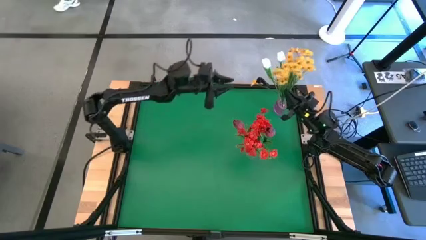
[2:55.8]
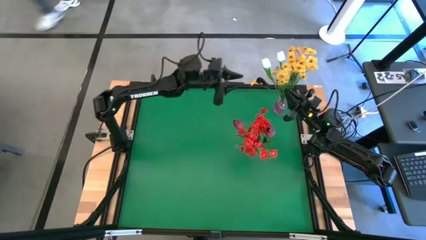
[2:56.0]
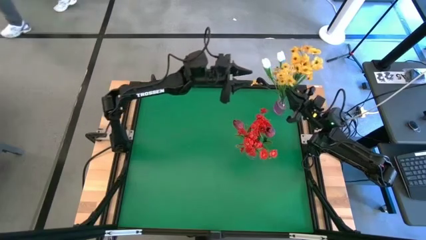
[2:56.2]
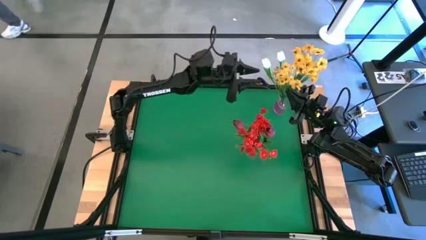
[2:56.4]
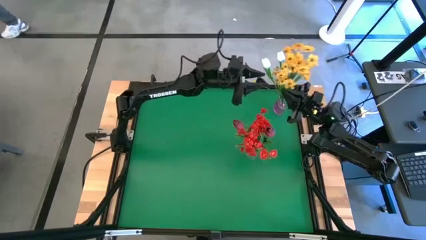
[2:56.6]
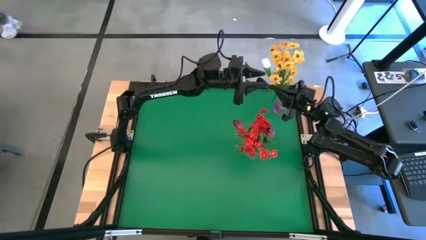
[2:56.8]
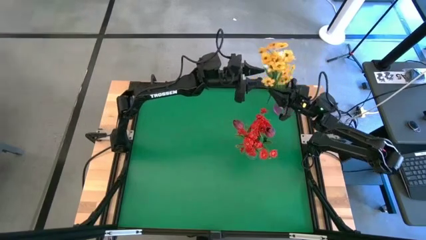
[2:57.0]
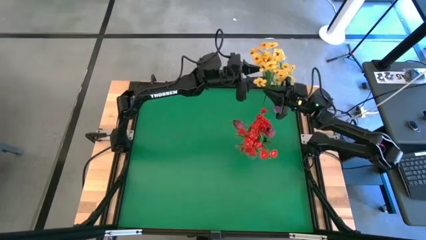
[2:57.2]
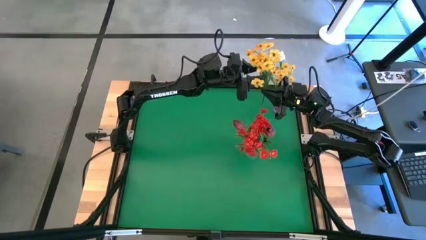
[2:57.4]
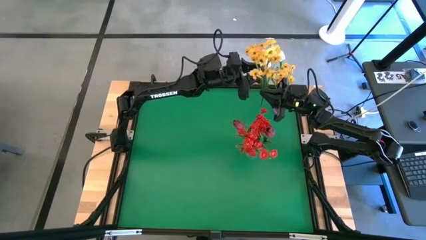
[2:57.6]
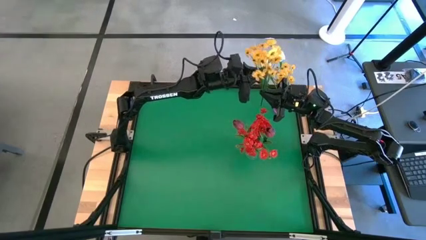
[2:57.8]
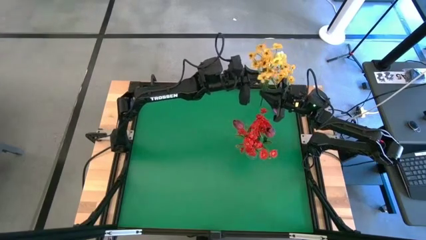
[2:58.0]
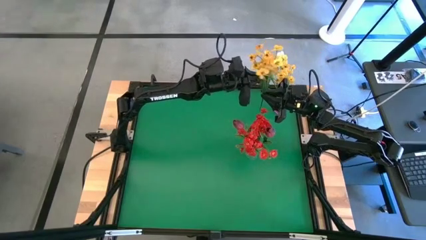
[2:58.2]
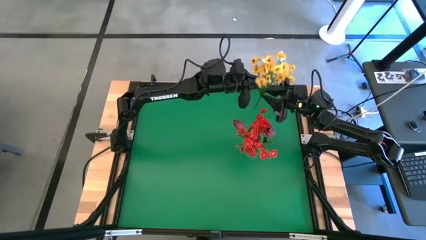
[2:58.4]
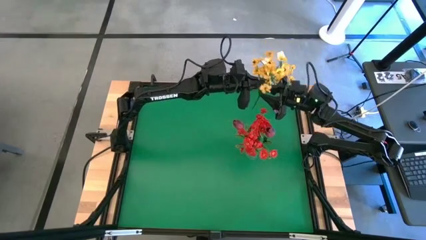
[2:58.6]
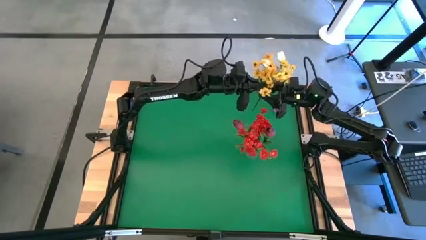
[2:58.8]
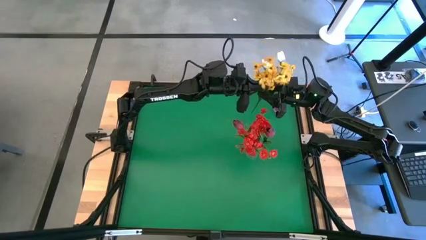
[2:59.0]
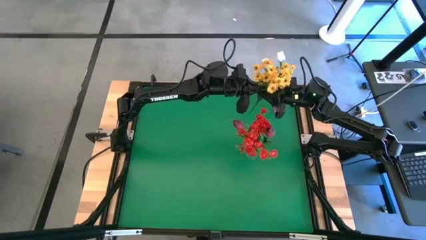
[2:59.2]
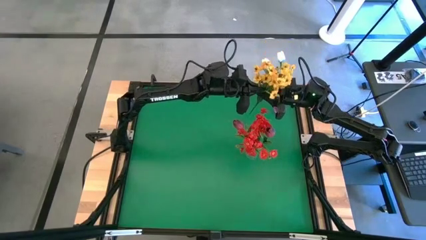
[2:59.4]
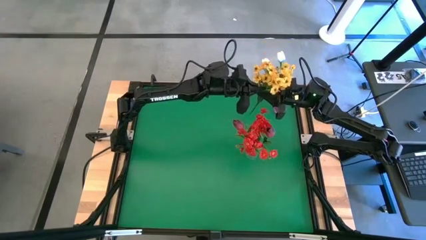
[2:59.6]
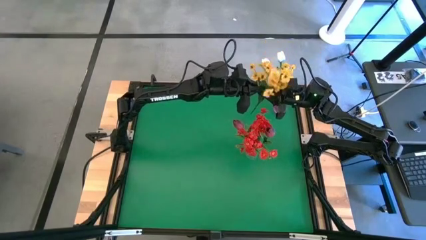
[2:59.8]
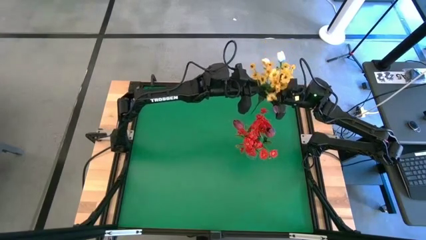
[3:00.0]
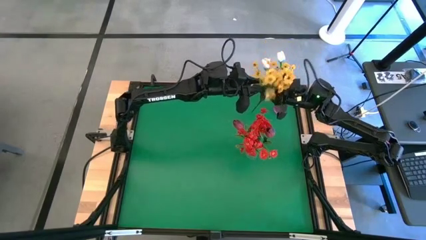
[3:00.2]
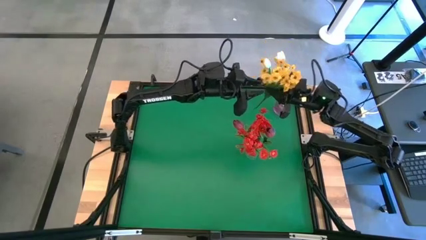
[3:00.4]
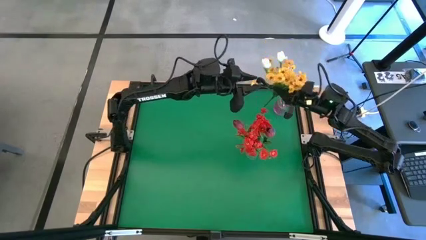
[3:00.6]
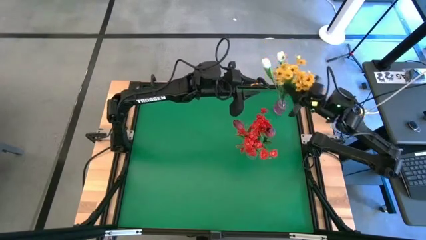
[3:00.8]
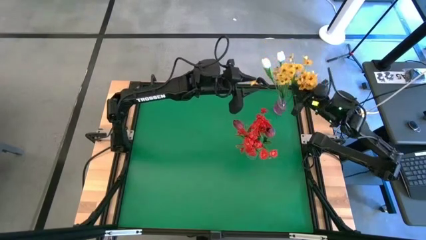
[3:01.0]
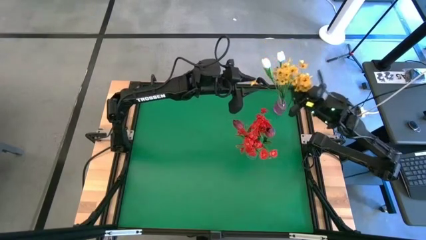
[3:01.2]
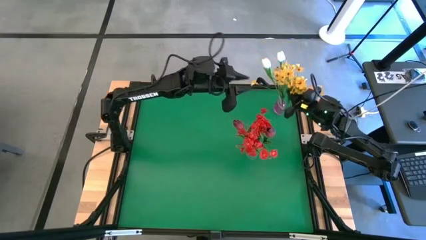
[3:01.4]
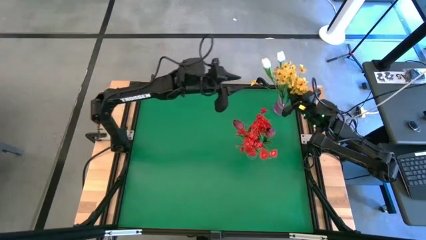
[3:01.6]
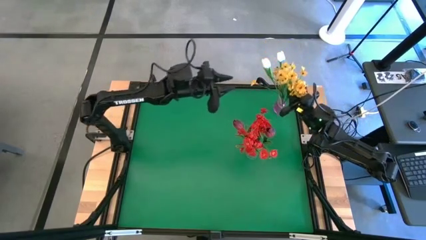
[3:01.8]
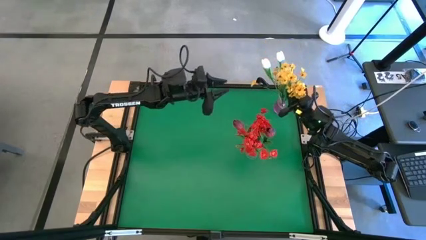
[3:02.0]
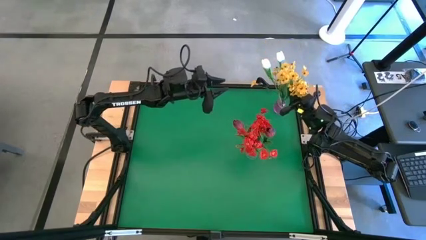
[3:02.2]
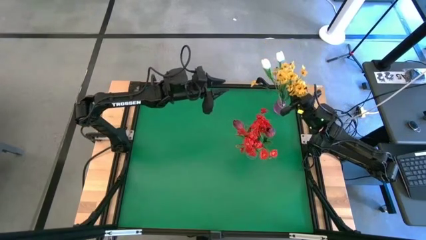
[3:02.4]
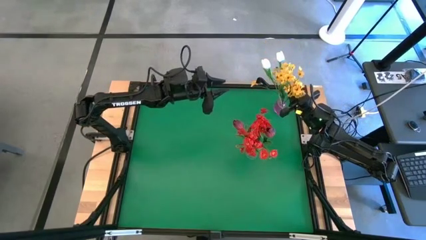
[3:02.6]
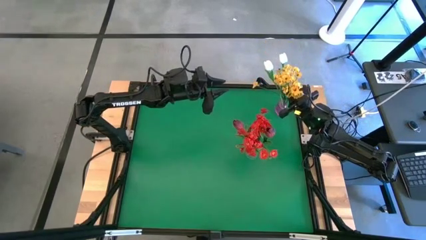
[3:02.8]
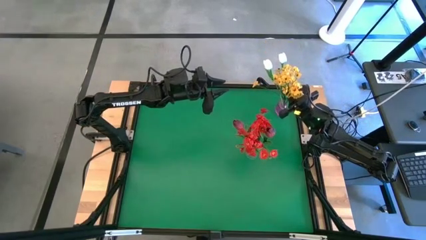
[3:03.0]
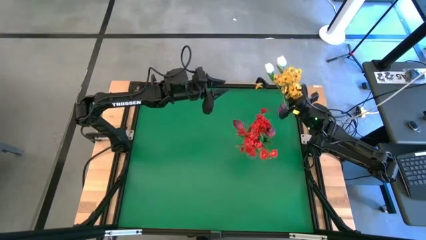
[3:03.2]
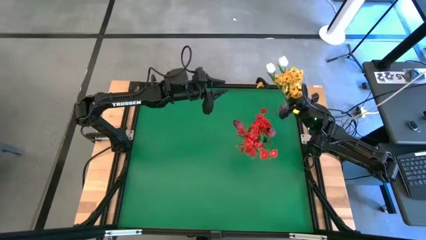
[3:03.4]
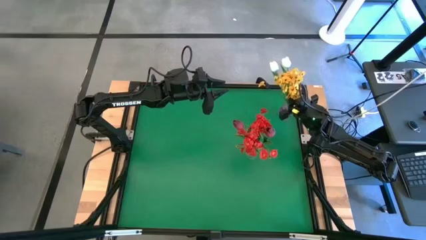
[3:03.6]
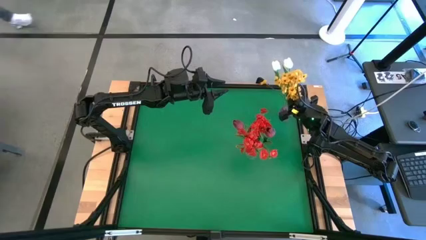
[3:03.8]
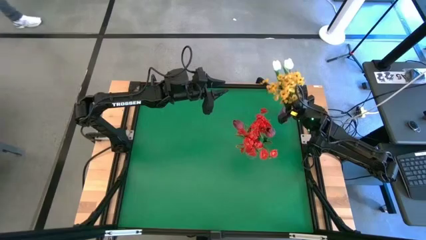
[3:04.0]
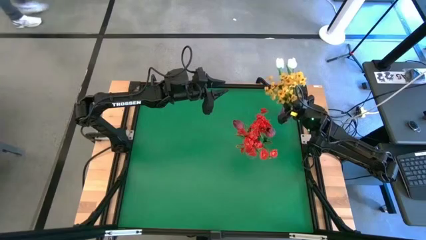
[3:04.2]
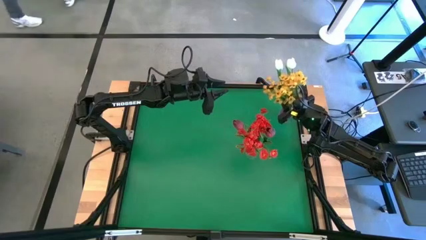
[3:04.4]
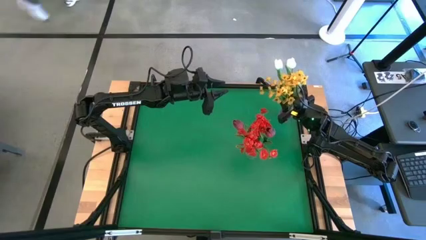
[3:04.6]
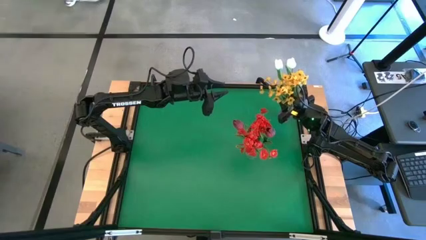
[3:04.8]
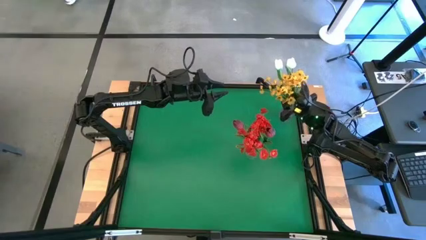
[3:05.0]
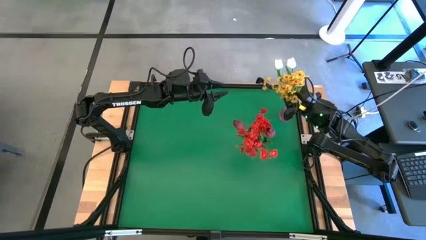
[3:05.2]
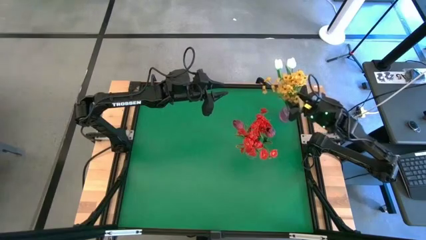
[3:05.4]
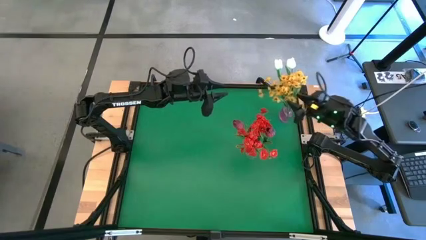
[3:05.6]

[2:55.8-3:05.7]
Task: Sort flowers into vase by color
Put the yellow flowers into the purple vase

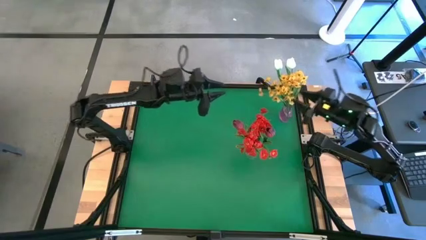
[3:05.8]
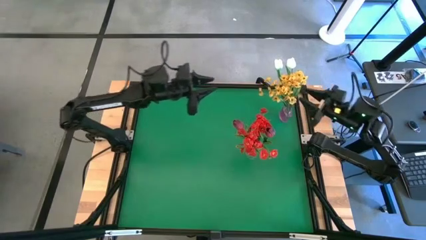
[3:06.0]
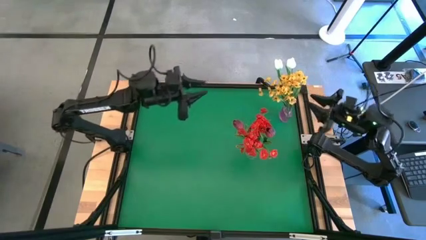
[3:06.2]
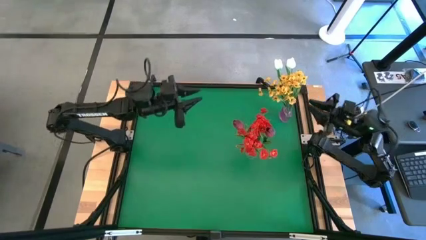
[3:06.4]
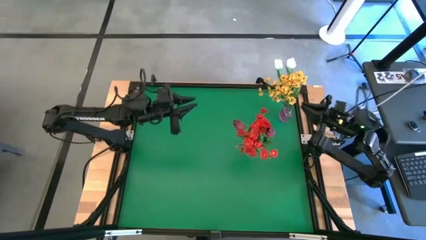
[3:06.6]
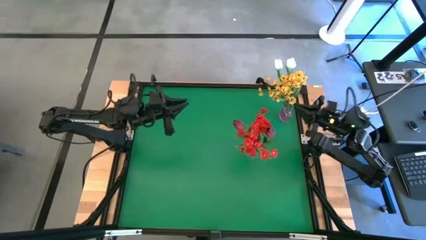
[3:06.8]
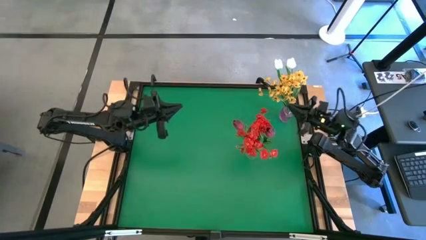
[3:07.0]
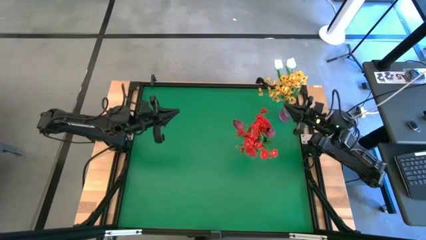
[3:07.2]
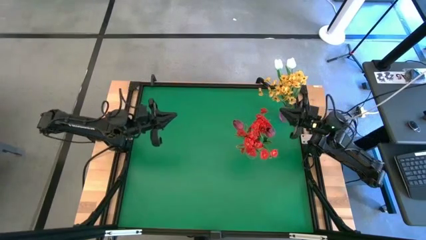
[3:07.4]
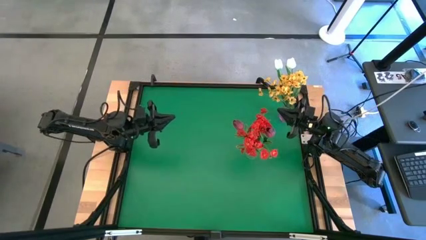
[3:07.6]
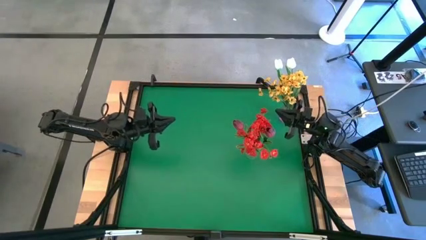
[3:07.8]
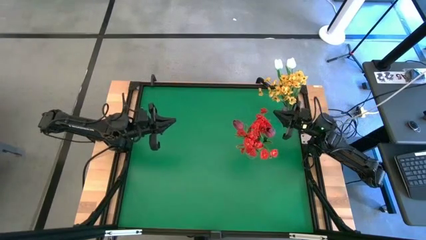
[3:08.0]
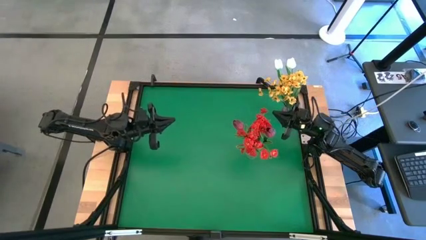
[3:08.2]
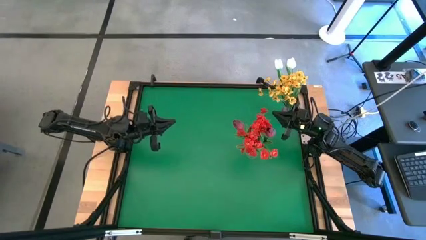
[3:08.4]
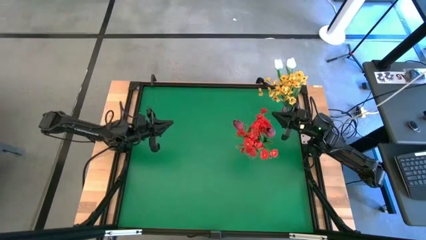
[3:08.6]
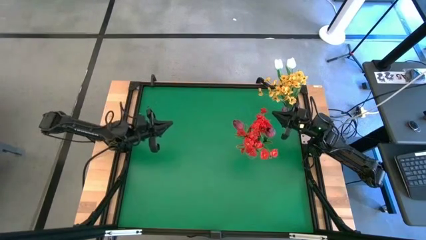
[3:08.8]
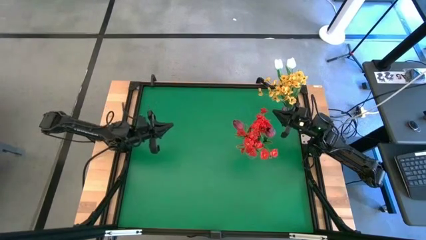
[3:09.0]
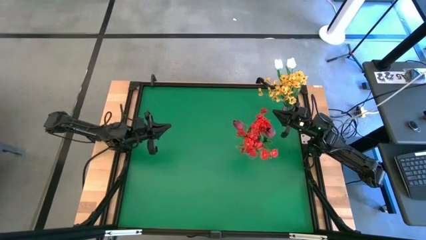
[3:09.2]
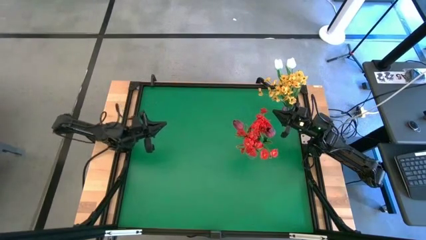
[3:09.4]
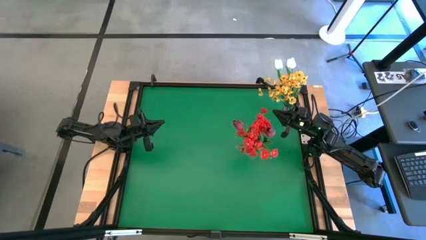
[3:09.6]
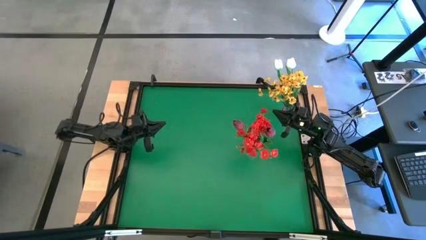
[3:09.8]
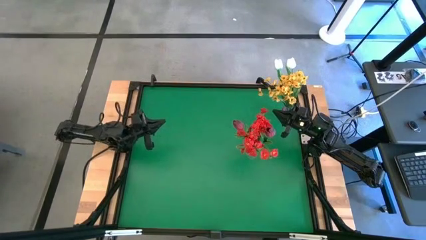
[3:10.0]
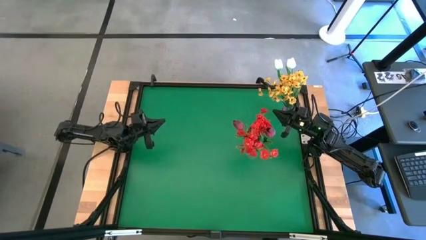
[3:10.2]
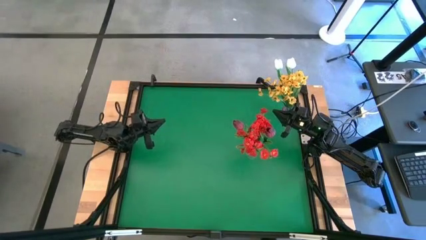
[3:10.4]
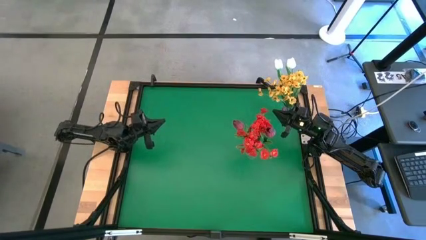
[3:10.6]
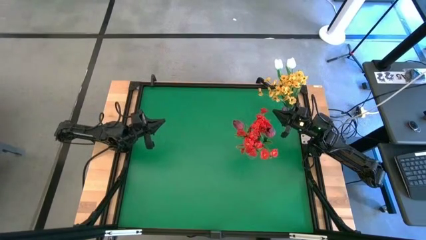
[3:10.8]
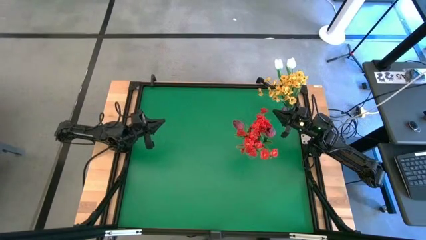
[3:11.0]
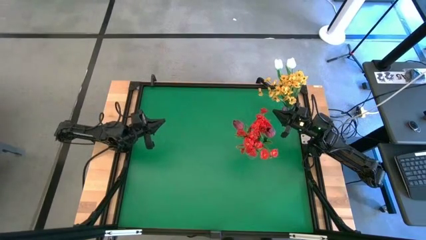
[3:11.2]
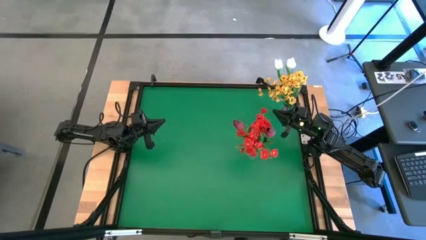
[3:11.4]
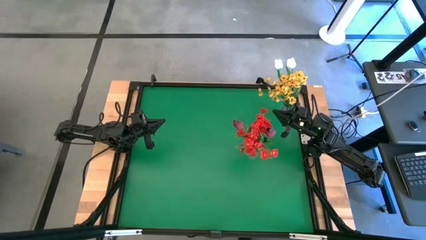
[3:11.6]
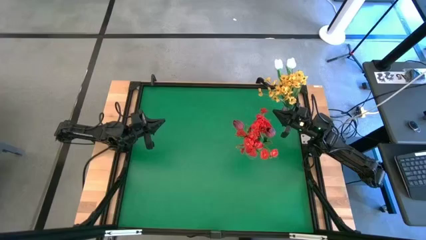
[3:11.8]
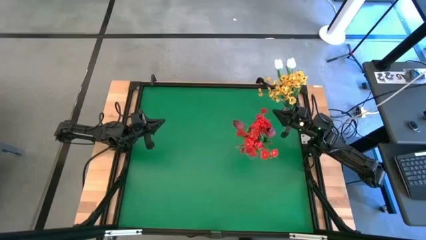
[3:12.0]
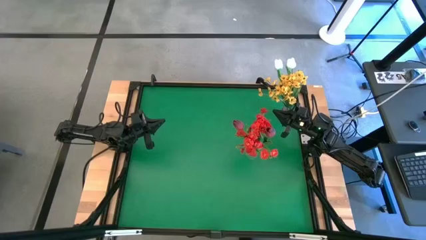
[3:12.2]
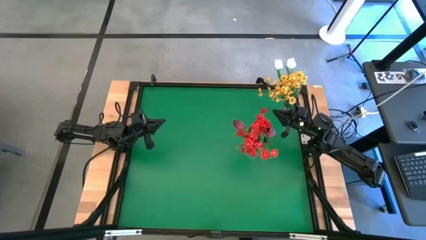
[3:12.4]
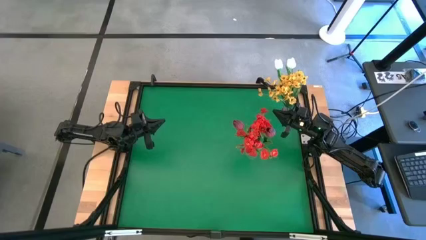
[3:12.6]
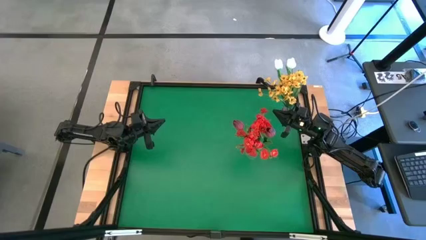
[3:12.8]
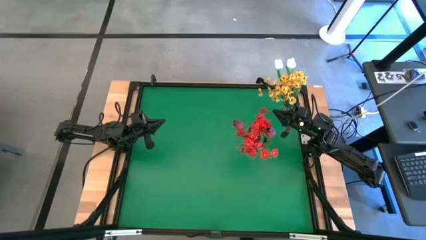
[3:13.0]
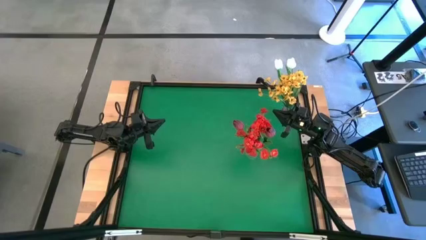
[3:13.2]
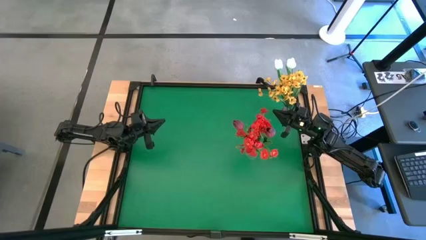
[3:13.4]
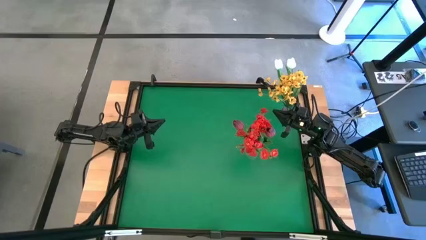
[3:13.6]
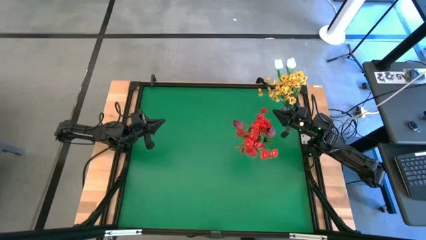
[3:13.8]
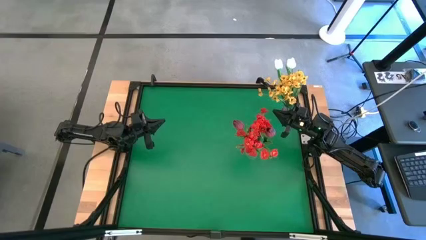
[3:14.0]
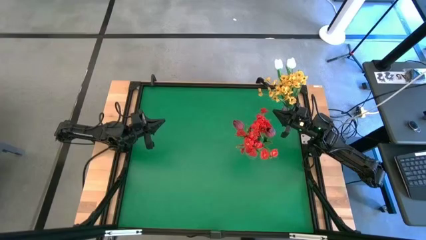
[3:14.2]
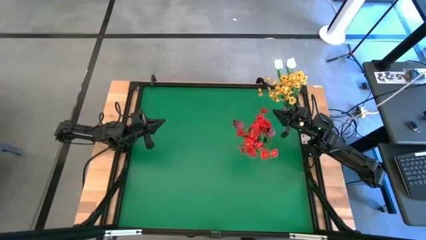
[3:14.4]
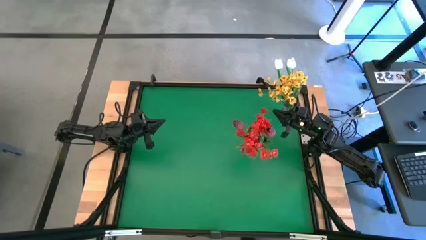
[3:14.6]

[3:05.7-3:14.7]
Return to Home Position
